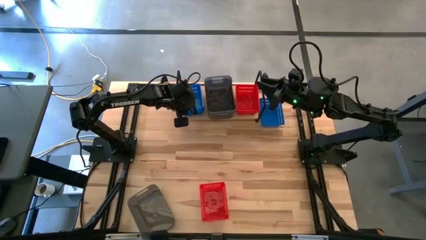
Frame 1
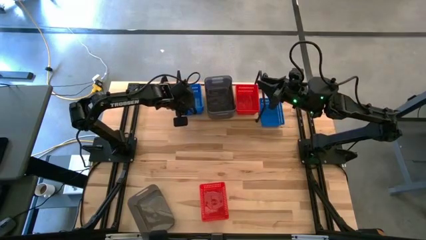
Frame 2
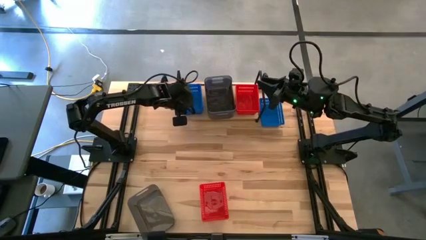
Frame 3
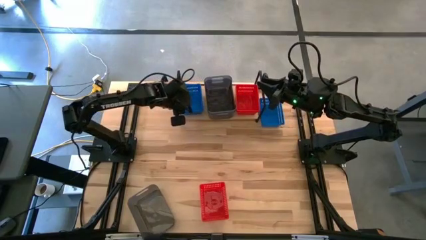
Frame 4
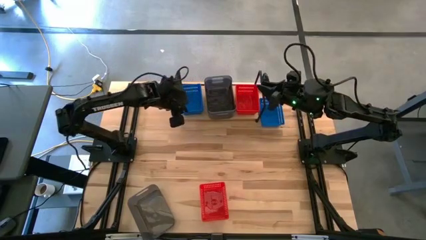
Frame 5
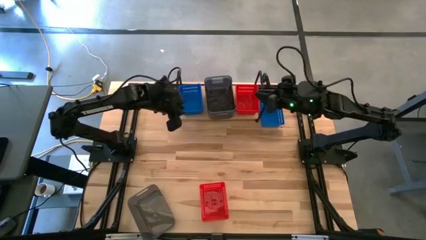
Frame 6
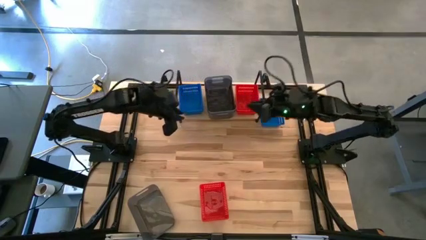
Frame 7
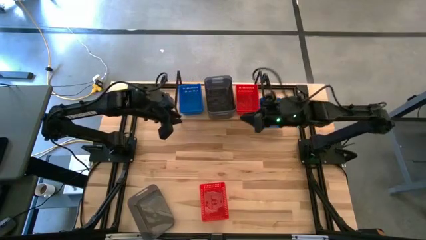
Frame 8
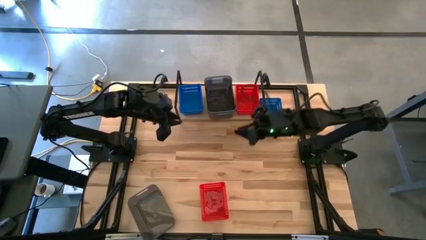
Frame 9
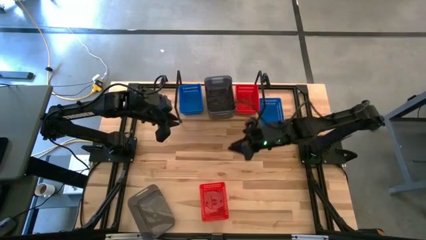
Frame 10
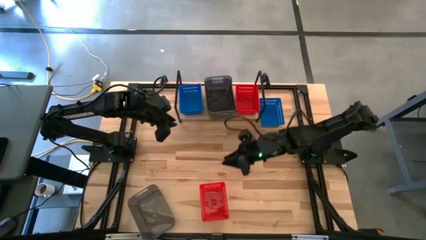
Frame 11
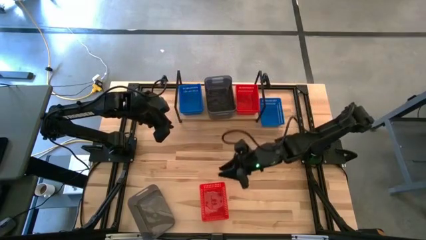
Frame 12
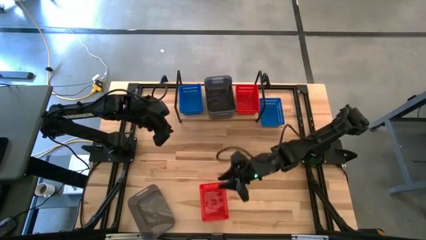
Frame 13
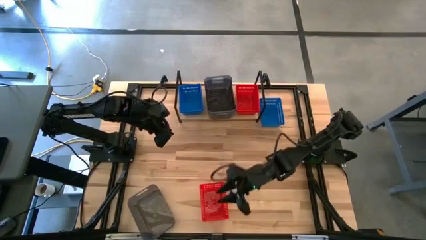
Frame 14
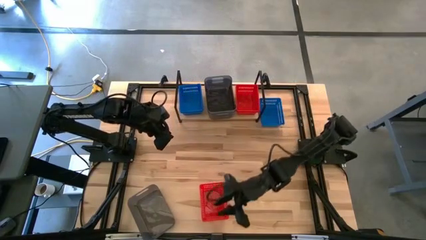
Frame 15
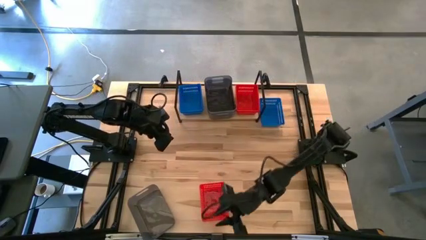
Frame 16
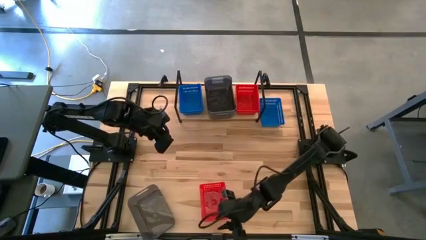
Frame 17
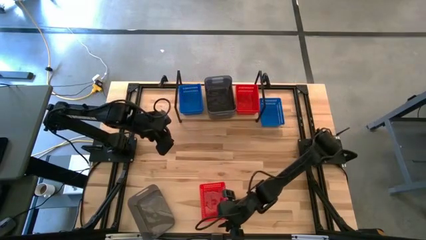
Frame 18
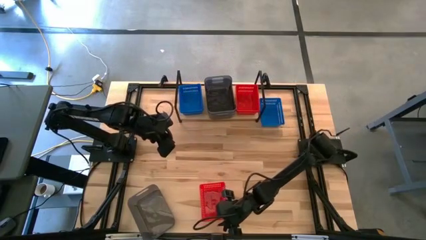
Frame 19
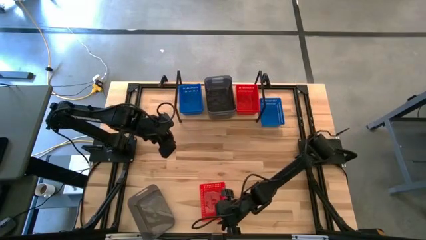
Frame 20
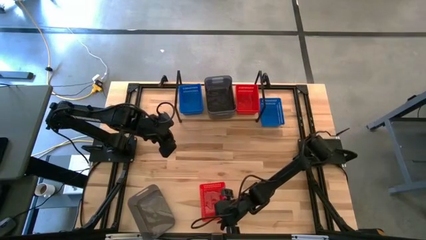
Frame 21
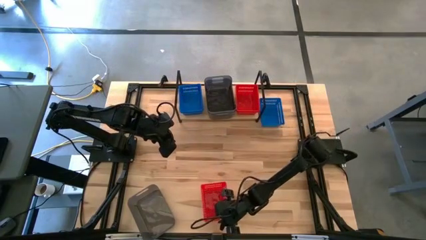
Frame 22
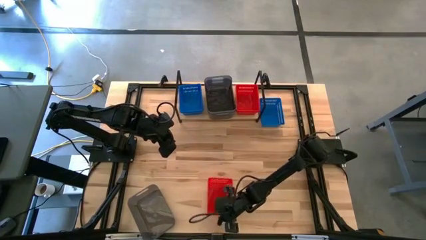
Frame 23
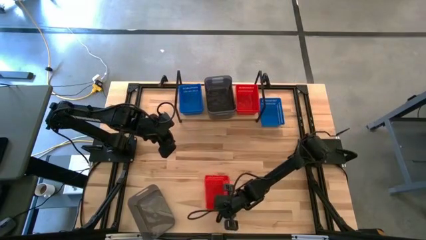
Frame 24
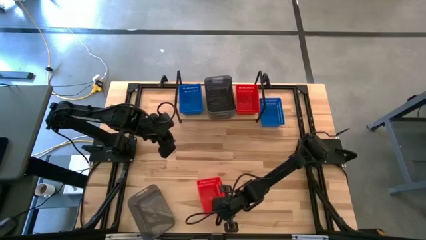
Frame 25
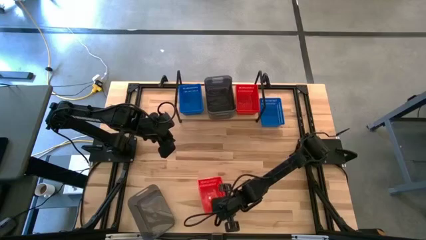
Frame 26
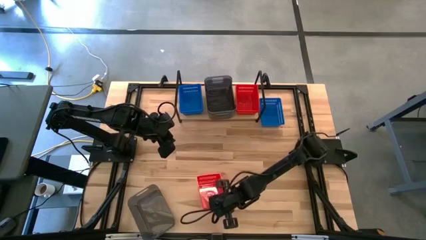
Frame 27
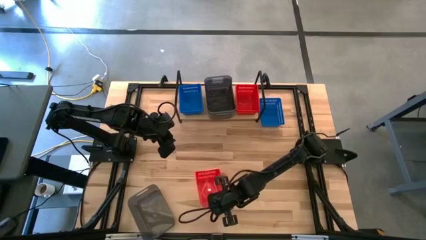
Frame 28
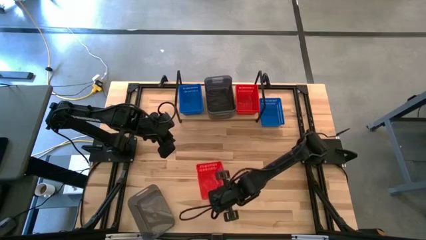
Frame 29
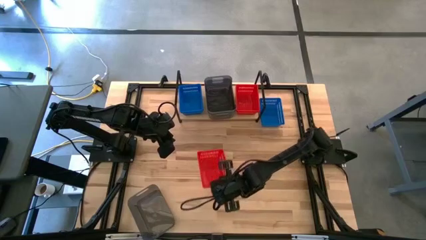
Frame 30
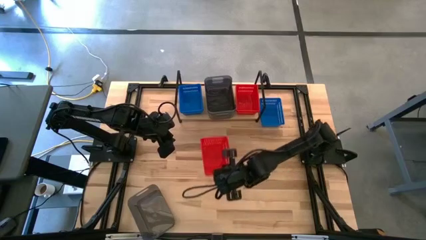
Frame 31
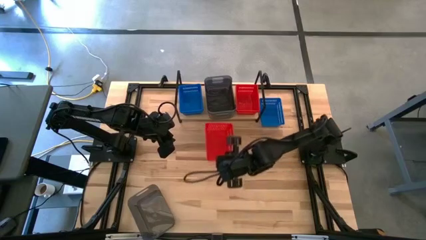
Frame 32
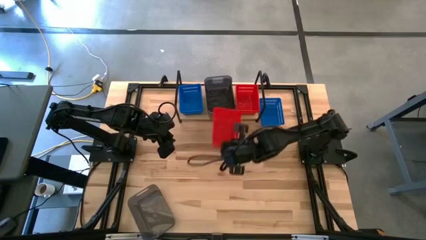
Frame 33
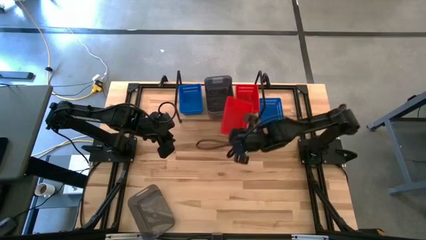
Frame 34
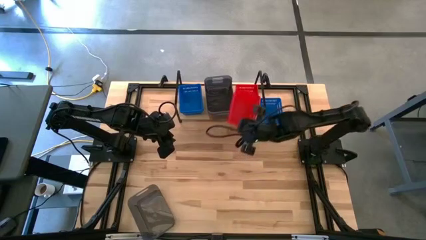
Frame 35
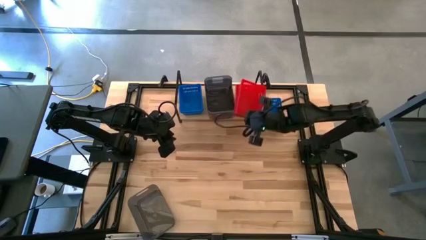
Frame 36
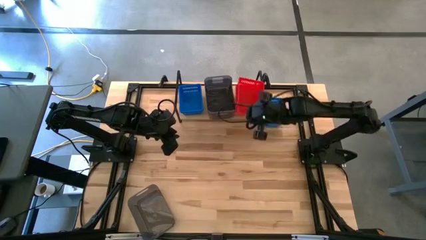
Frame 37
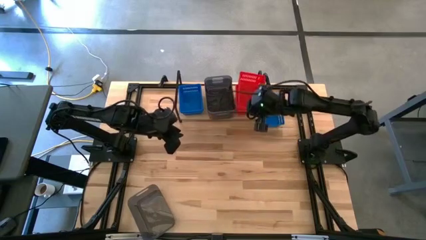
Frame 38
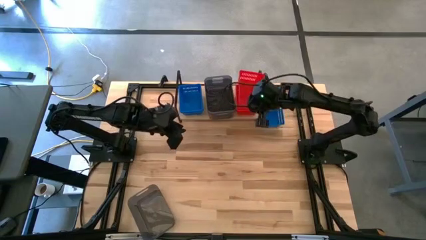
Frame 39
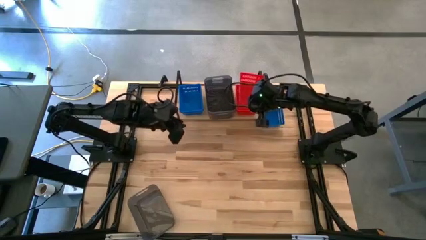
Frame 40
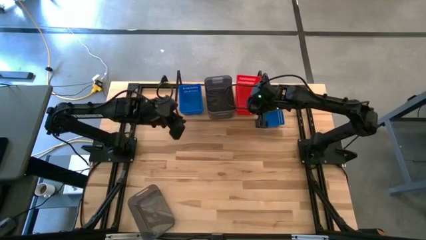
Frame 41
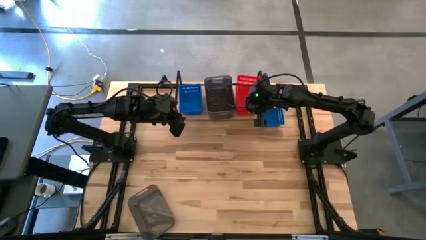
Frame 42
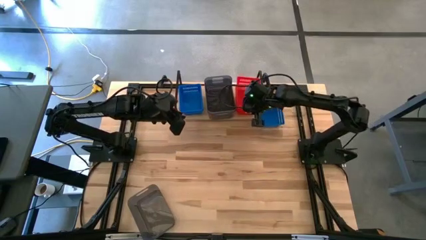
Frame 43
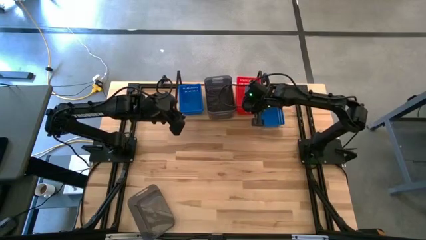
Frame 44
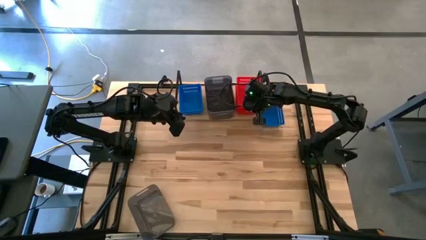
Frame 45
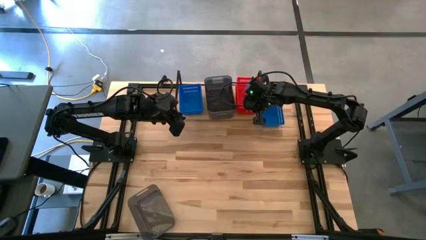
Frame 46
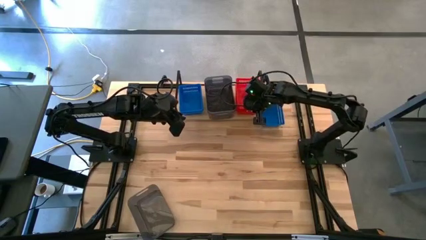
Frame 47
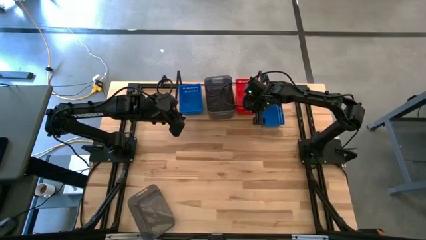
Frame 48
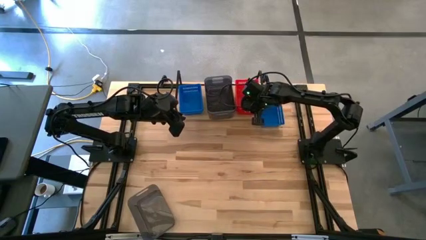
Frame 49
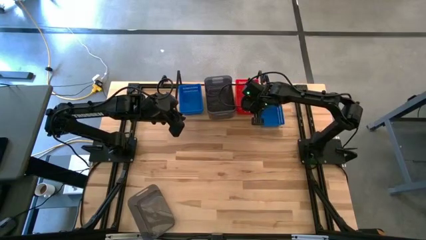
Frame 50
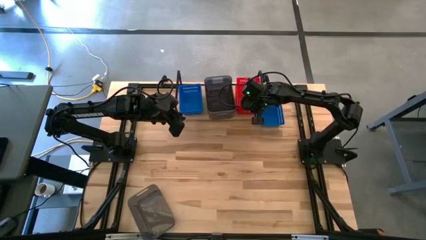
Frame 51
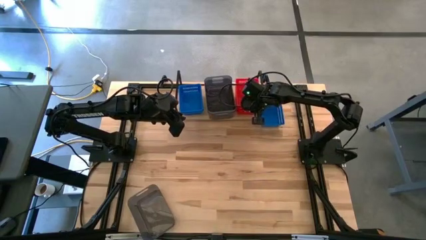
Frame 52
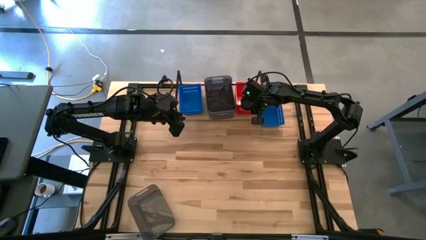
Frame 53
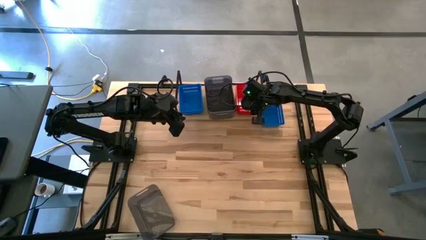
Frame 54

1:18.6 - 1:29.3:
Task: Stack baskets on shelf by color
Stack the red bin on the red bin on the shelf

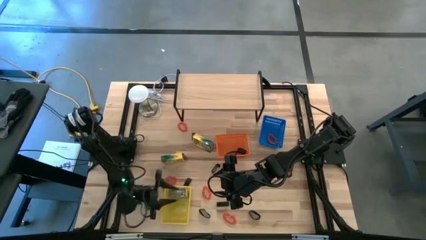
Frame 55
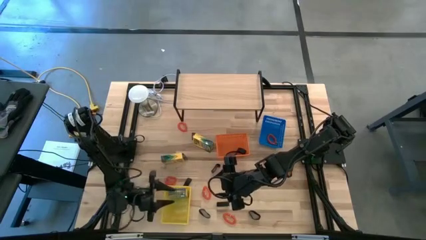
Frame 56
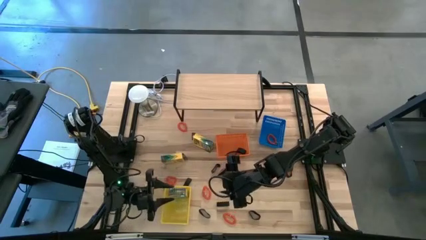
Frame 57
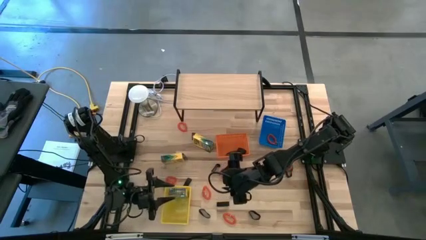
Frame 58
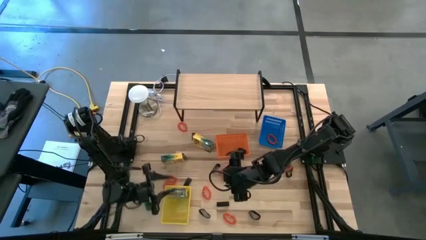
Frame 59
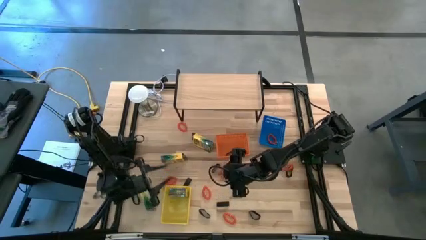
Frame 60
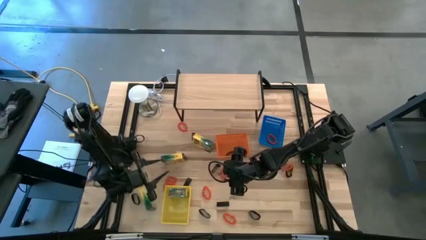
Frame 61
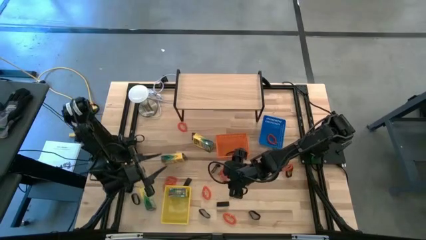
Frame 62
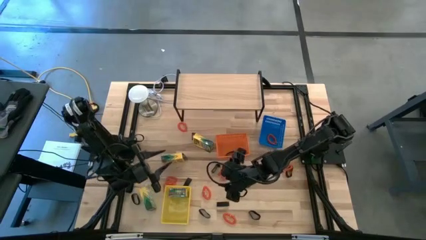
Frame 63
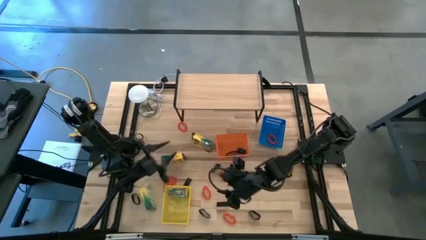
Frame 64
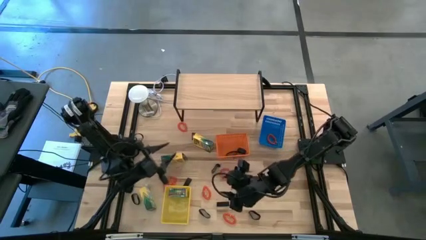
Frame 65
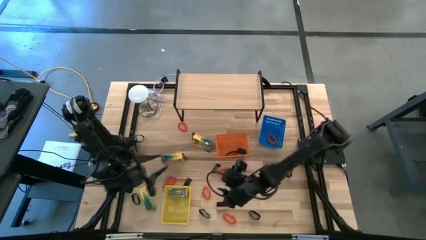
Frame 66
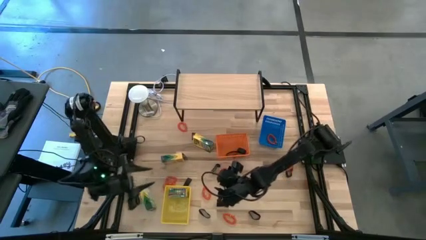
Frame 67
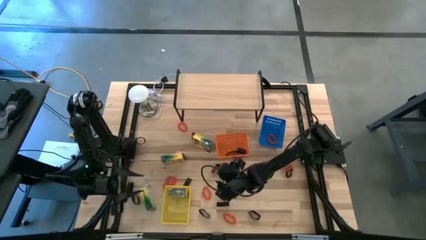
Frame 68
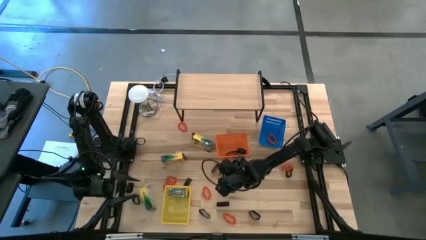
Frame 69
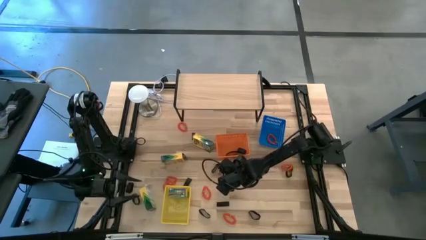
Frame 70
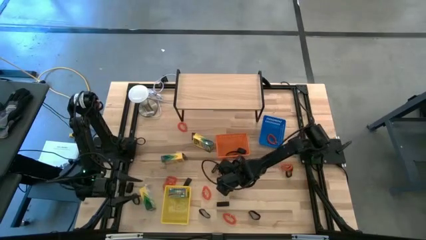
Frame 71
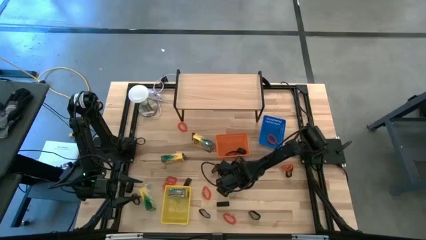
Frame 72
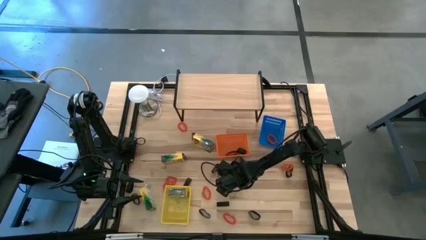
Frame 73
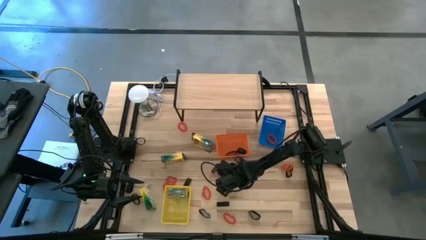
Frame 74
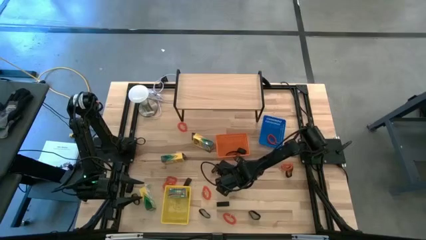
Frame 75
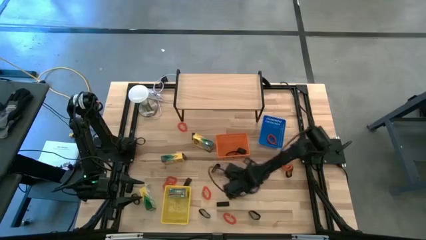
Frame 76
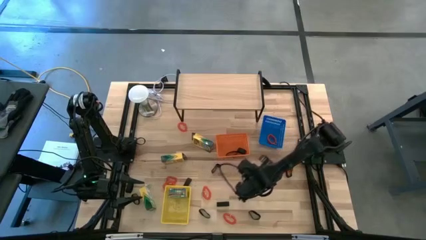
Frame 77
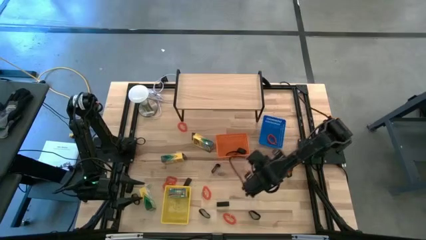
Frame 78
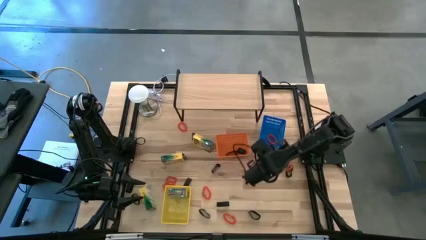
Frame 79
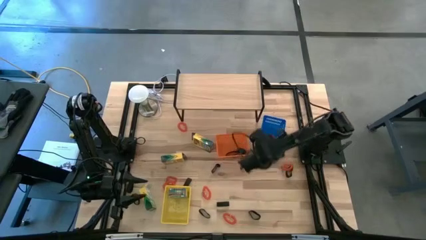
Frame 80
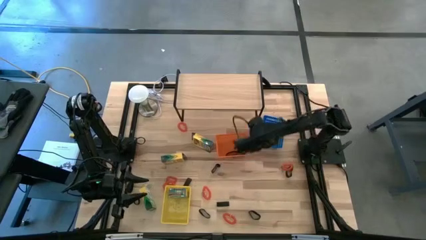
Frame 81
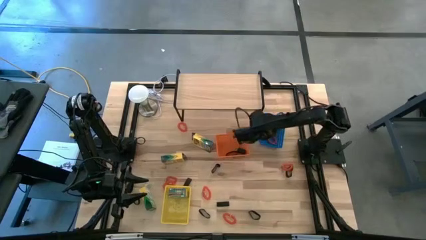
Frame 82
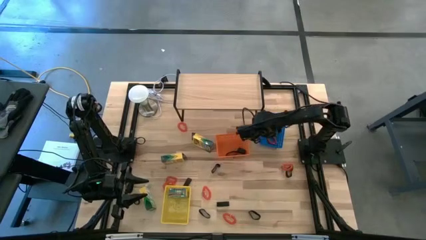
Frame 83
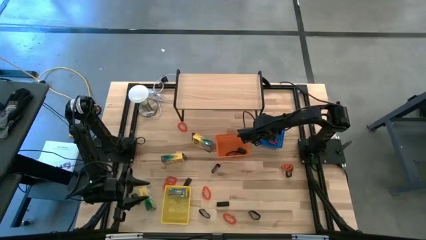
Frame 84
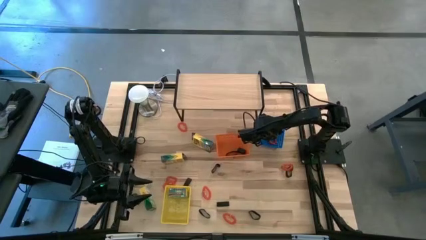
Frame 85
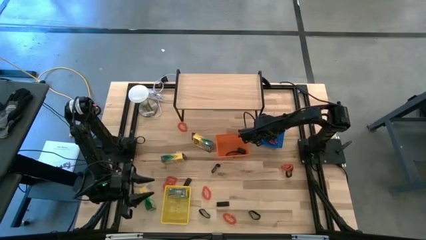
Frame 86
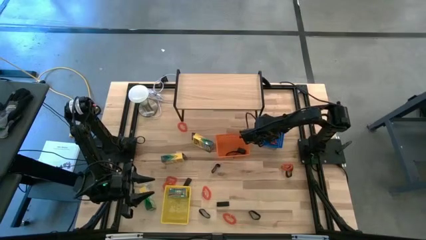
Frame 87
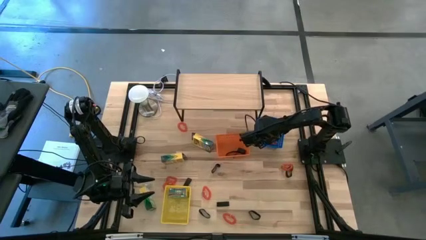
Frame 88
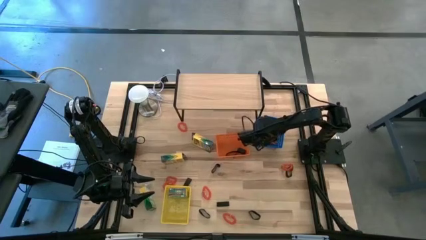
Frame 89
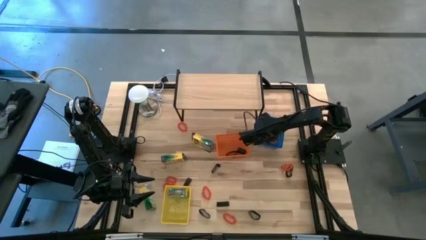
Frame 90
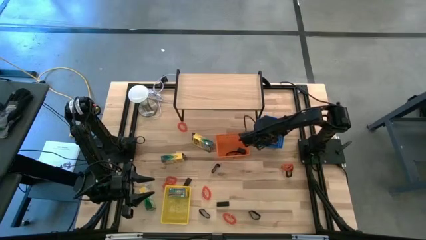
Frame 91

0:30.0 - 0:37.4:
Task: Pick & Place Office Desk Supplies
Put the spring keychain into the blue bin
